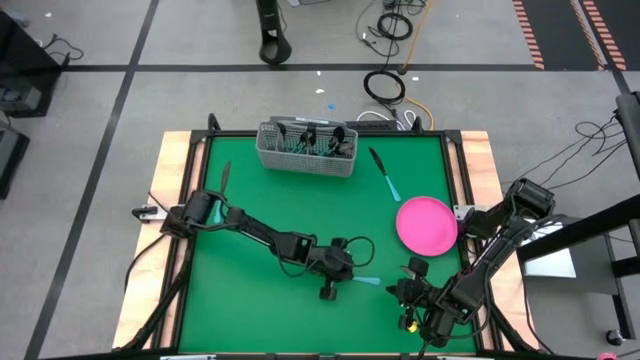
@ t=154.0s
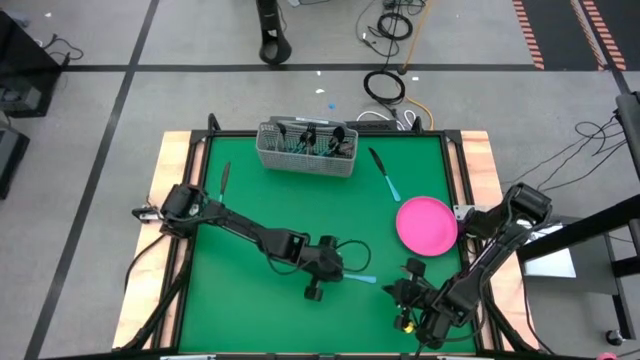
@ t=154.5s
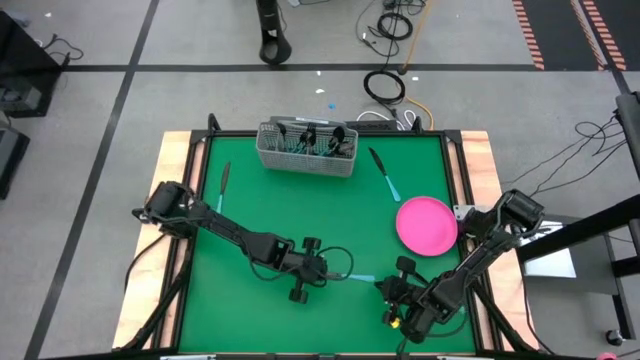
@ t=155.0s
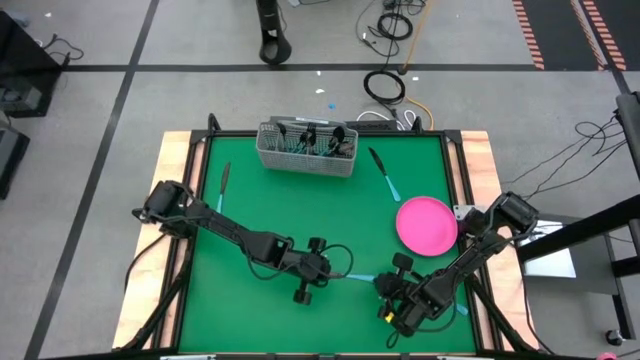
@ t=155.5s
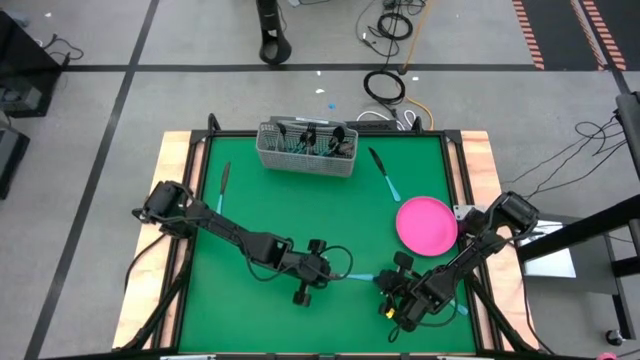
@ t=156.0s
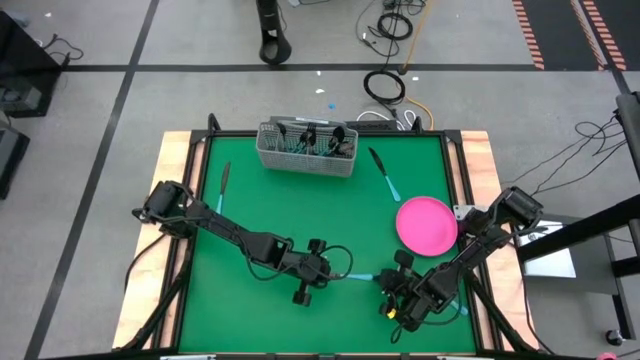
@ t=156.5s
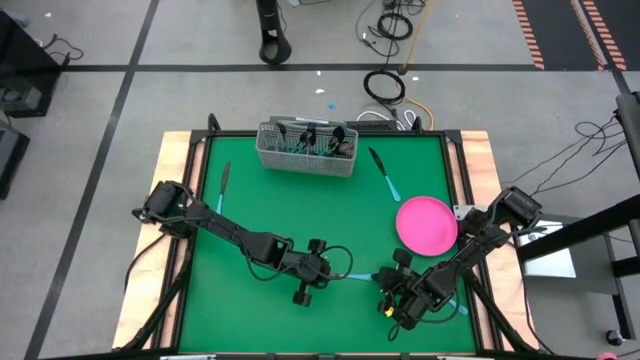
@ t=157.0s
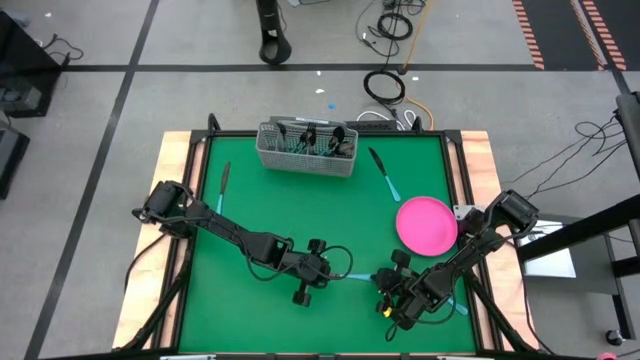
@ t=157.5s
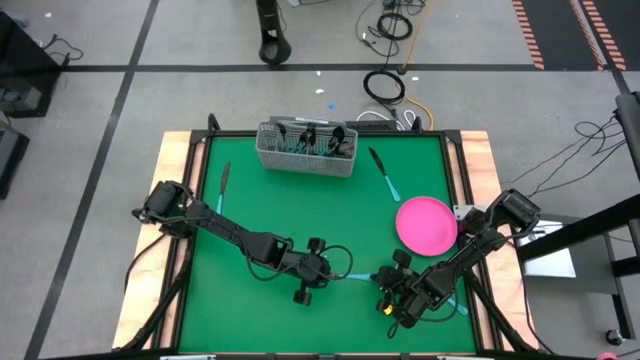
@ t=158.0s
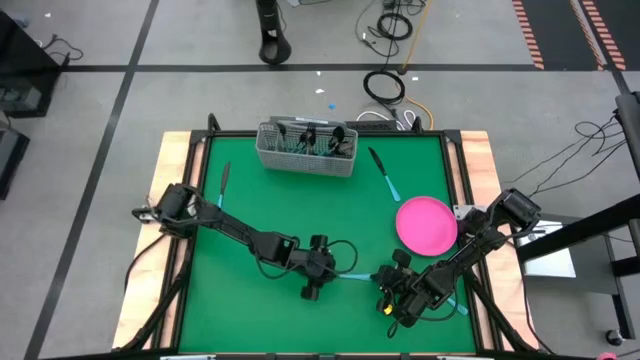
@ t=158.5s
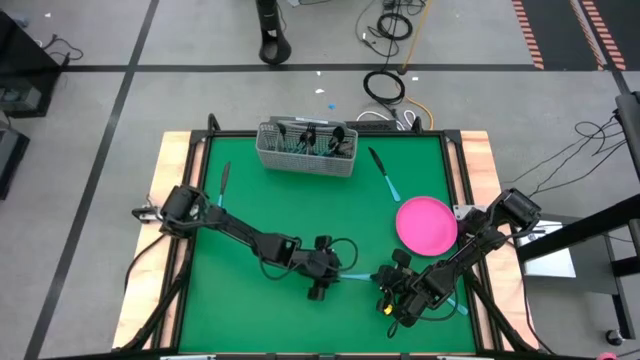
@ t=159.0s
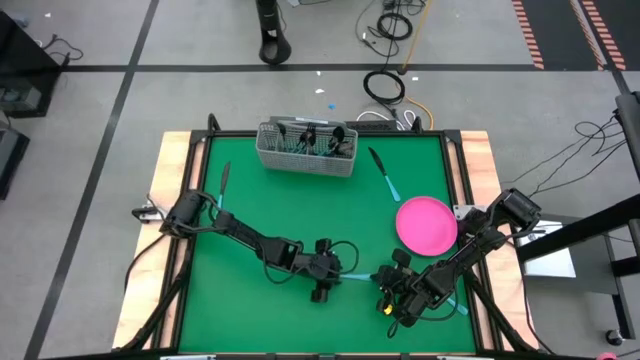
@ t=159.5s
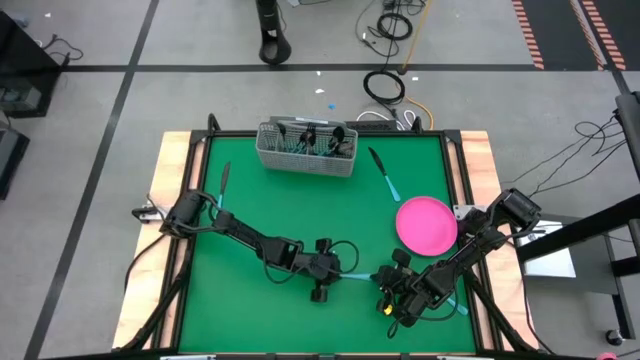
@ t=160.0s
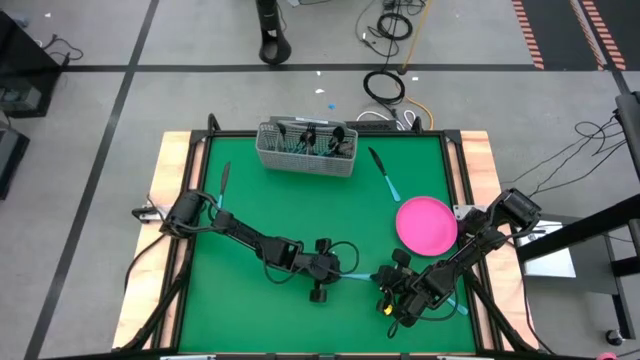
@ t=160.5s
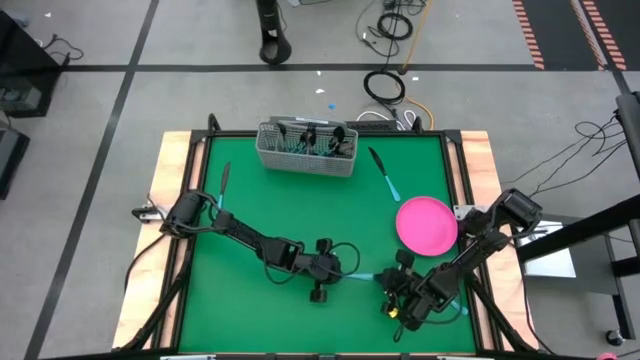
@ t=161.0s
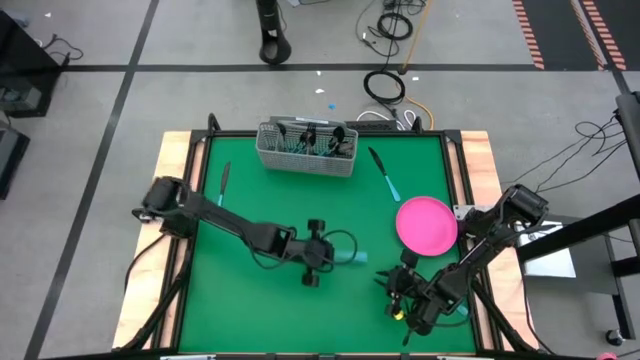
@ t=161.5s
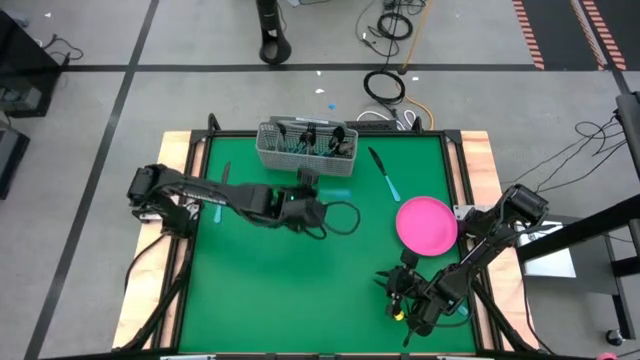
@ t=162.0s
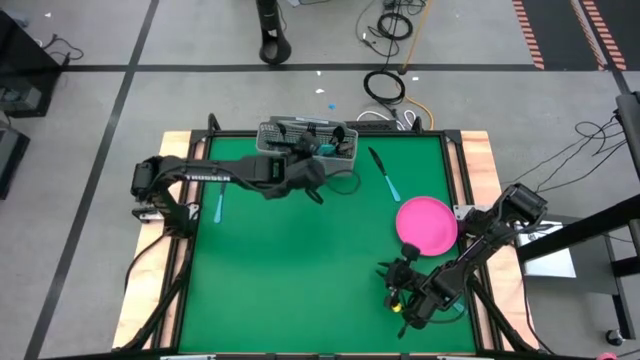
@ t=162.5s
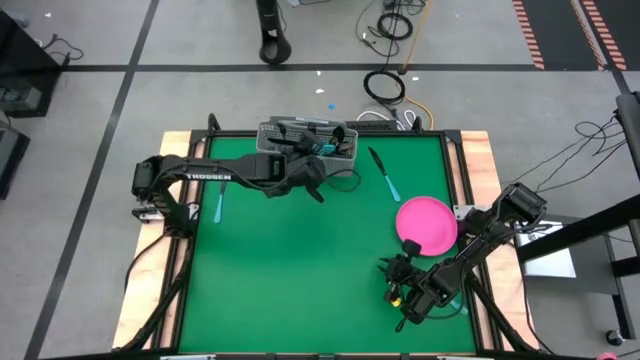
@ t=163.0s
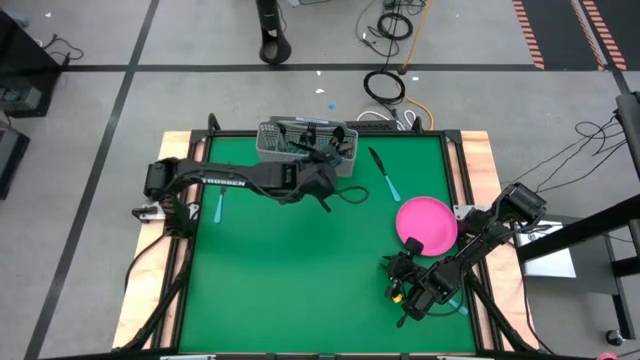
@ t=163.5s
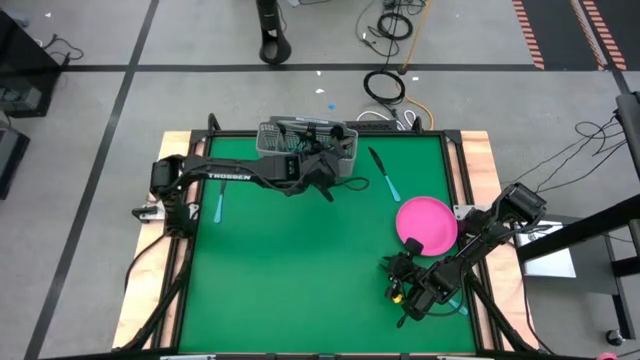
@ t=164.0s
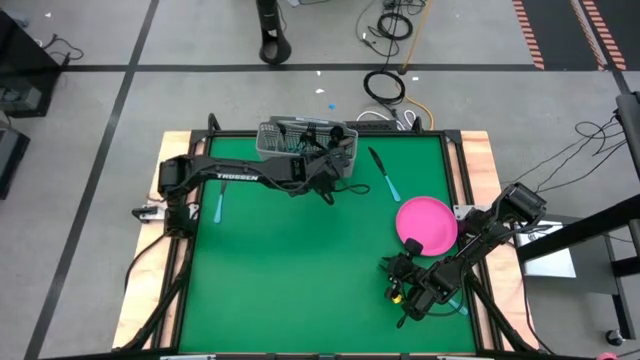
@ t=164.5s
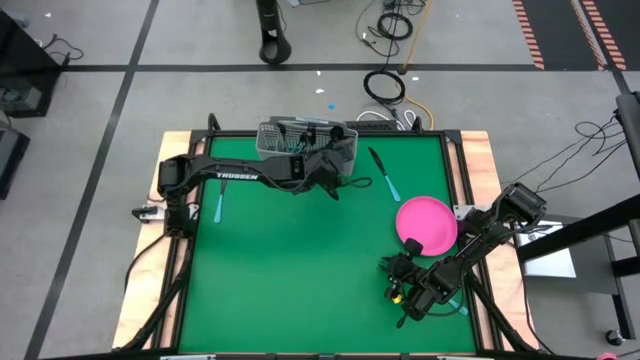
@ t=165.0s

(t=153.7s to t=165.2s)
Task: Sort silverware
Put the blue table knife into the silverware tray

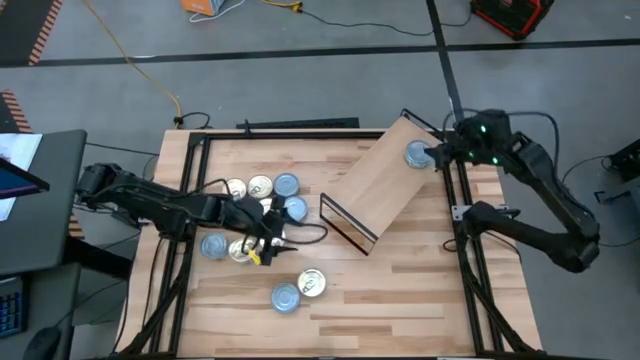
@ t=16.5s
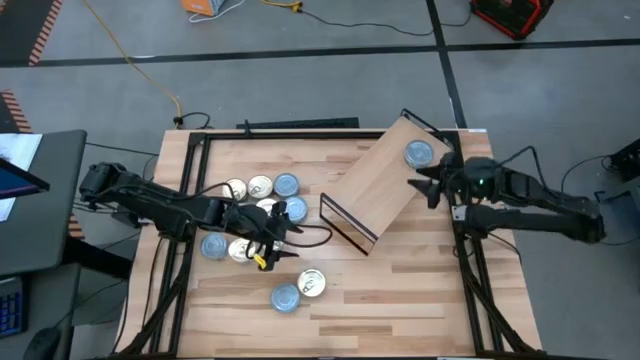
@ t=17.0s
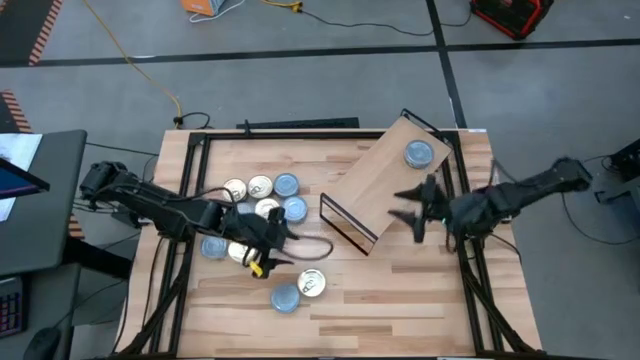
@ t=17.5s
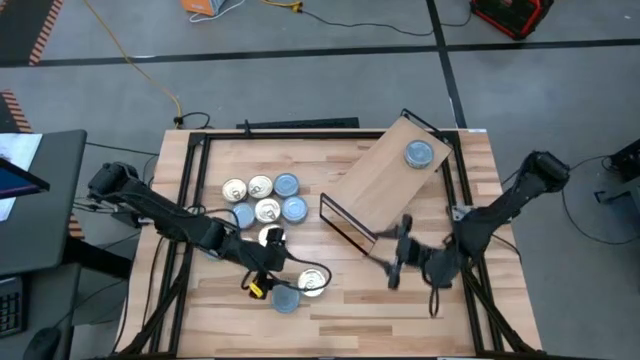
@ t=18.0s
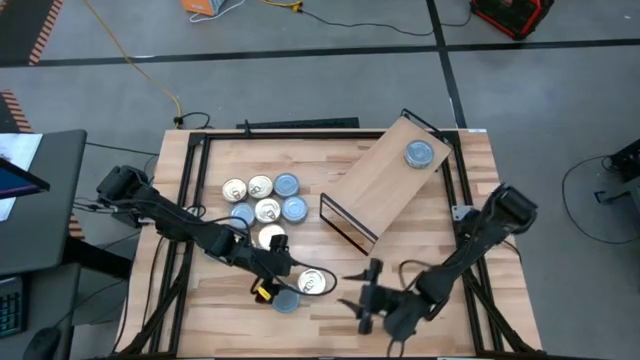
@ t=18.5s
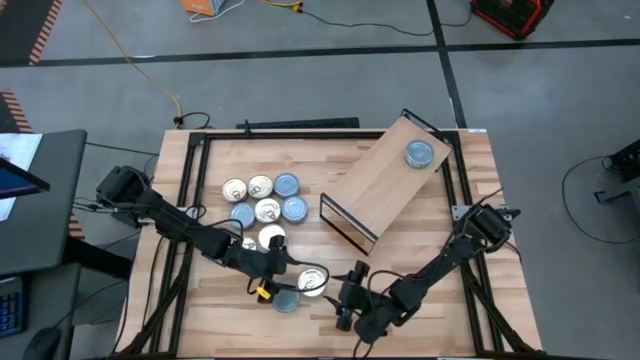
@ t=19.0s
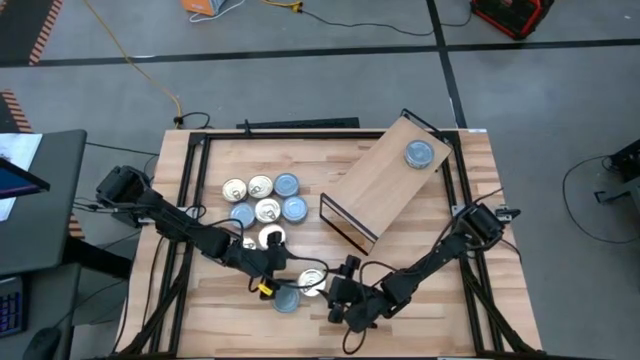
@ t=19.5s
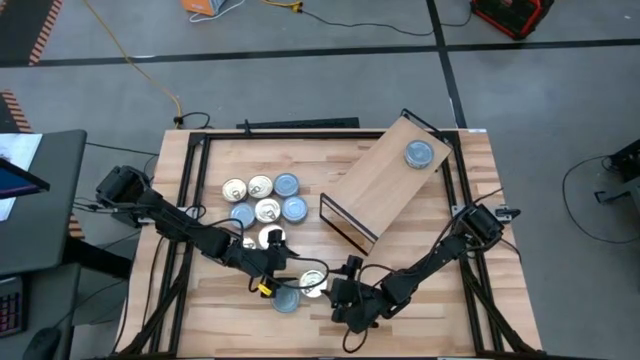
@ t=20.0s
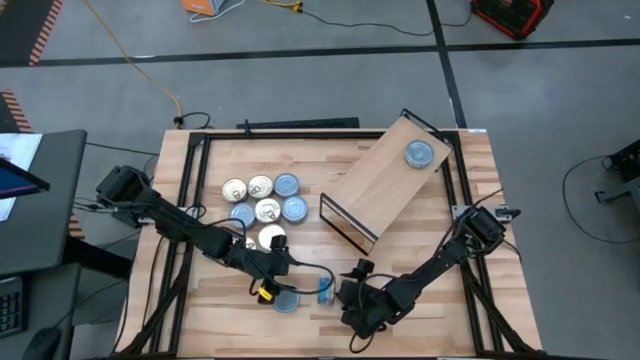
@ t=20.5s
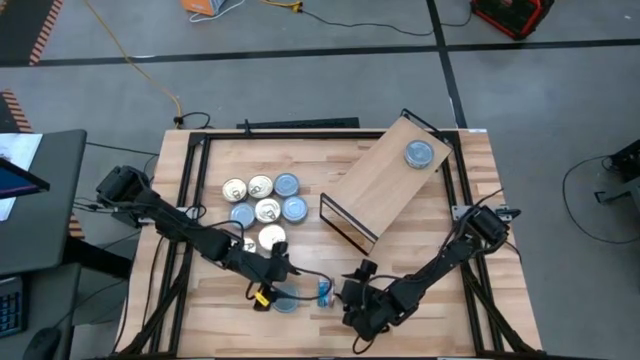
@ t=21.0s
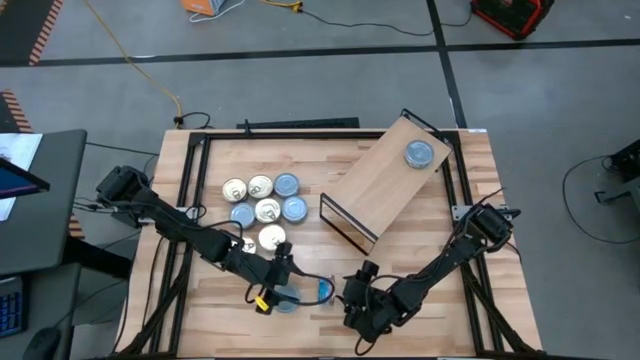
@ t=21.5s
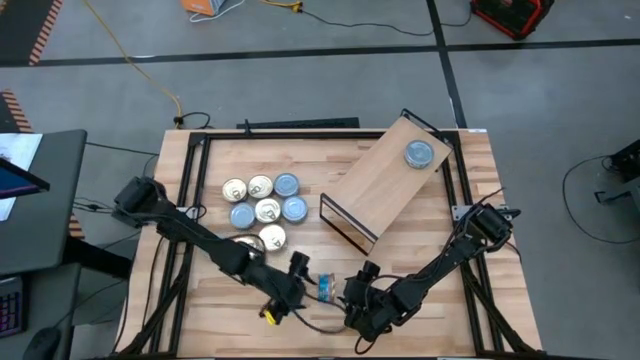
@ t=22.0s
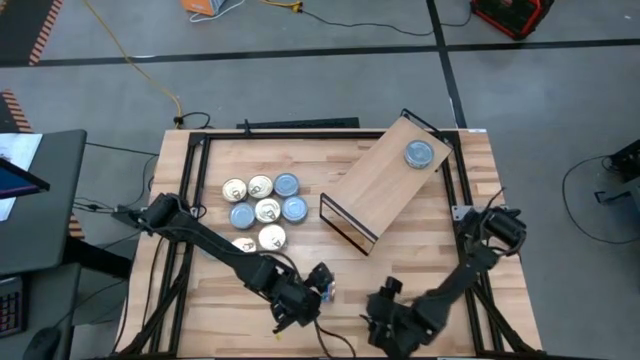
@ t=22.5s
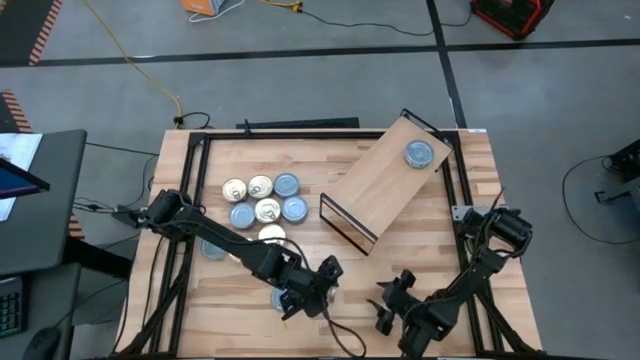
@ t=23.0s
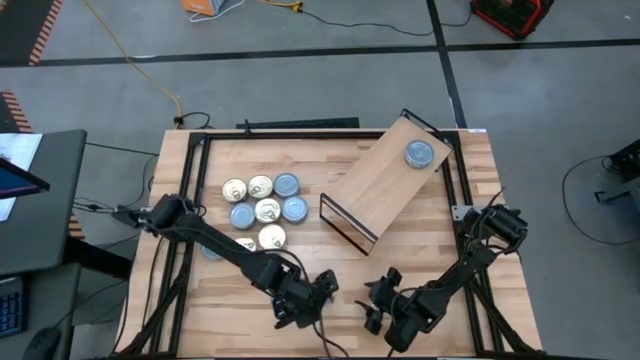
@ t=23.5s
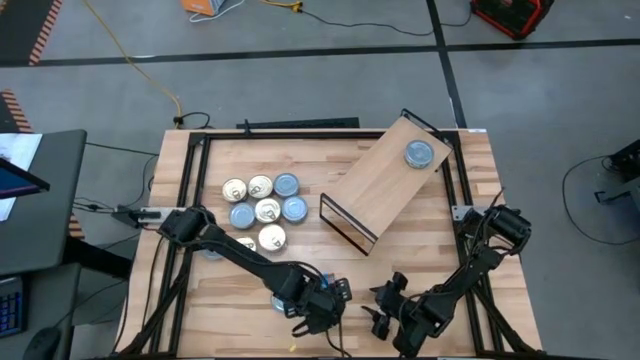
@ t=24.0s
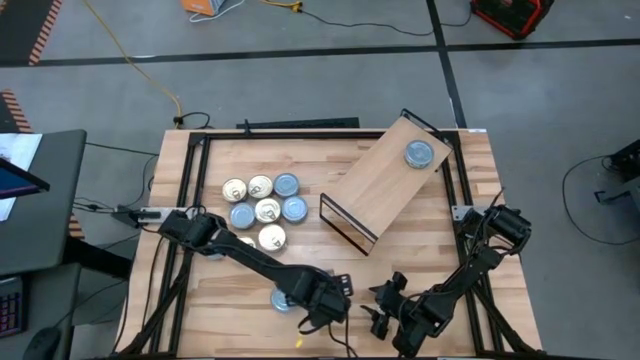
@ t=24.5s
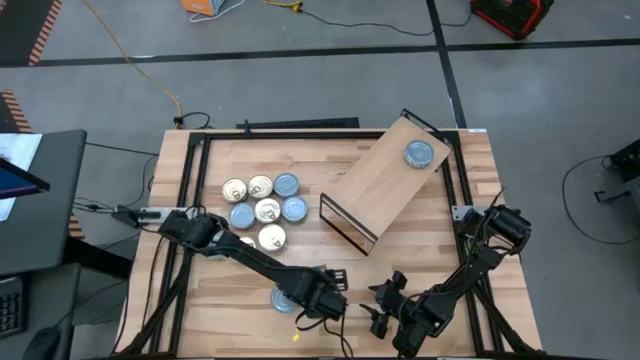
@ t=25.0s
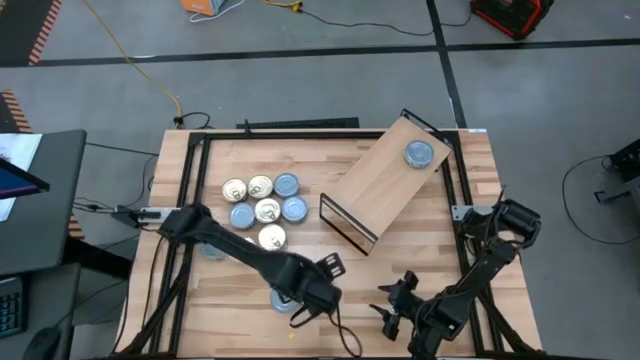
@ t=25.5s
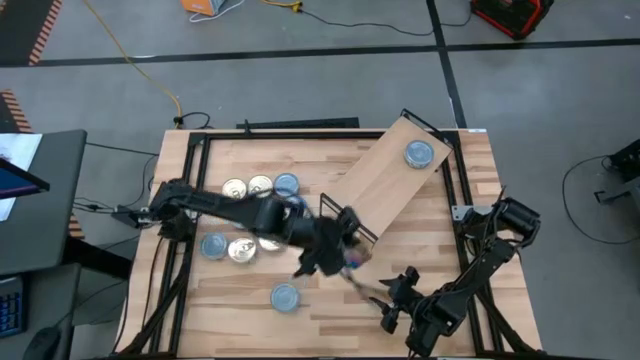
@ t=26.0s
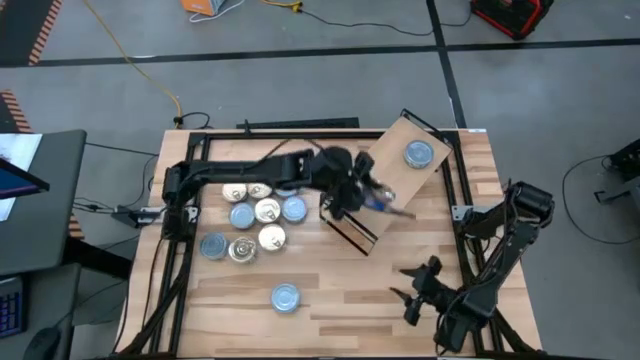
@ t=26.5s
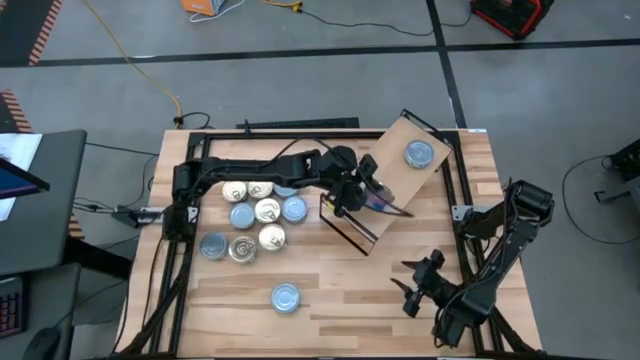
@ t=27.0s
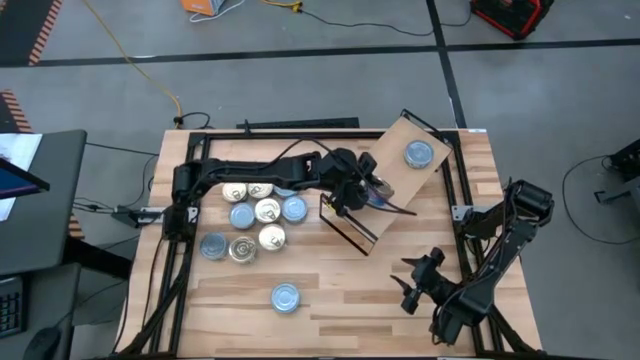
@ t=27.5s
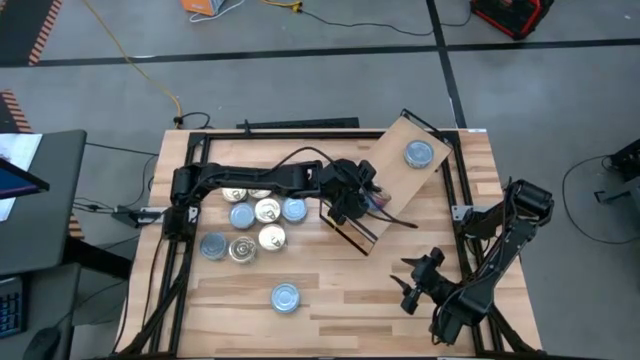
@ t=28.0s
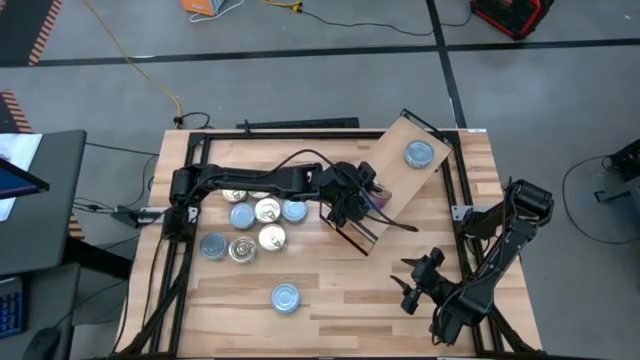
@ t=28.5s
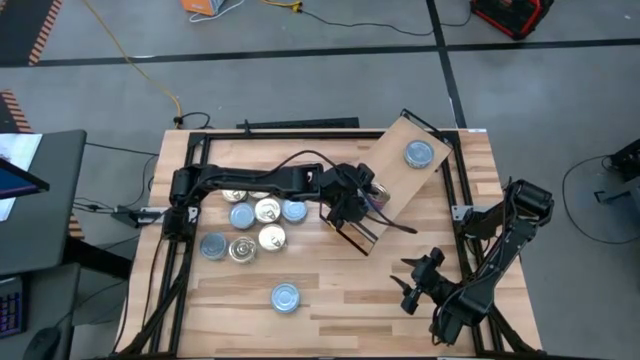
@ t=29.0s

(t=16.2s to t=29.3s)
Task: Stack canned seafood by type on shelf
Put the blue and pink tuna can on the shelf
